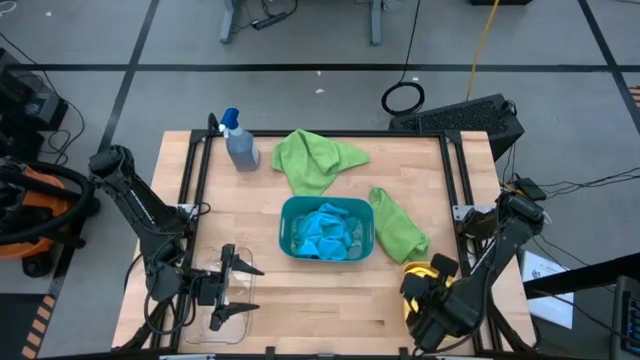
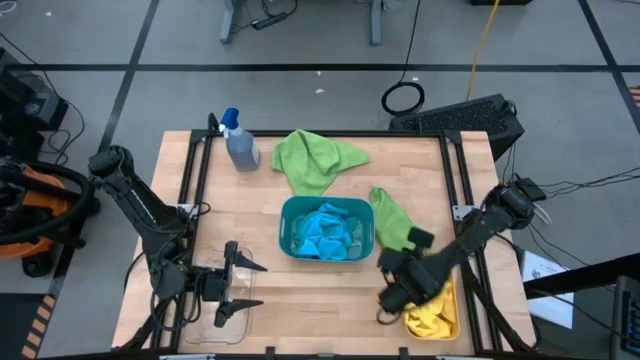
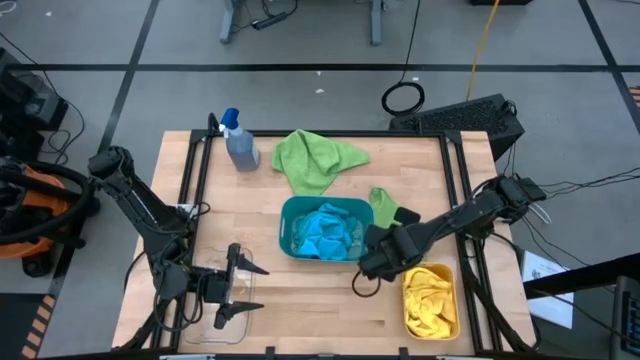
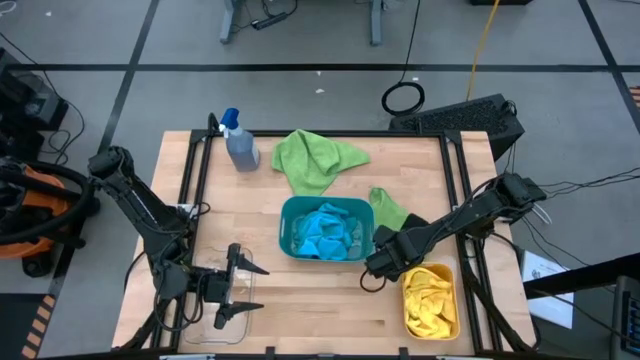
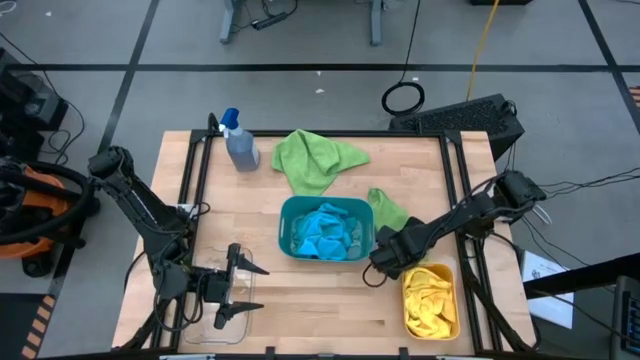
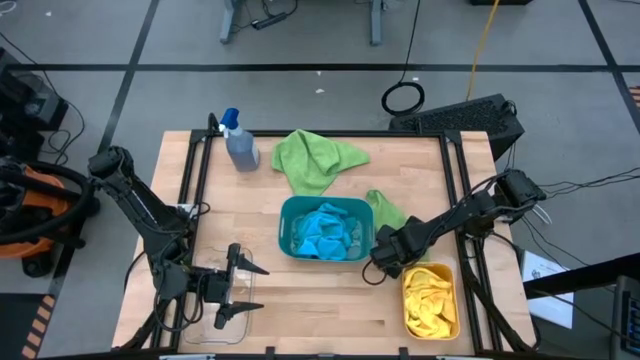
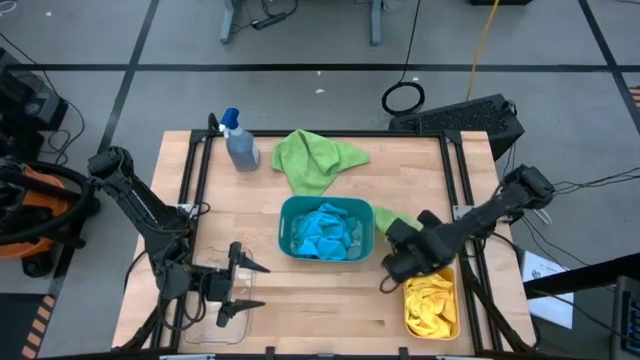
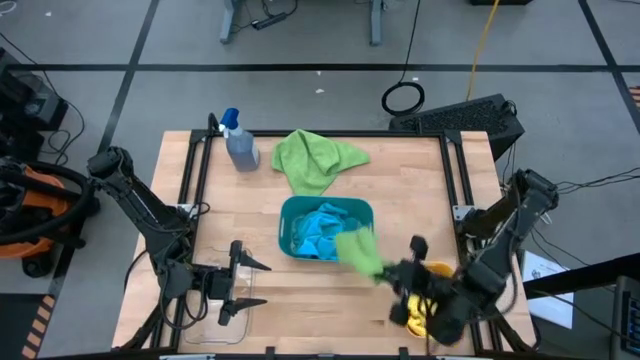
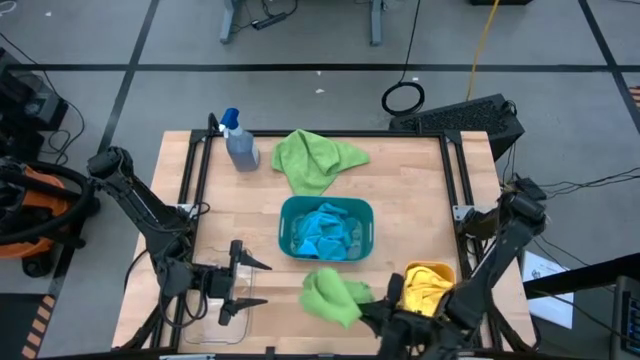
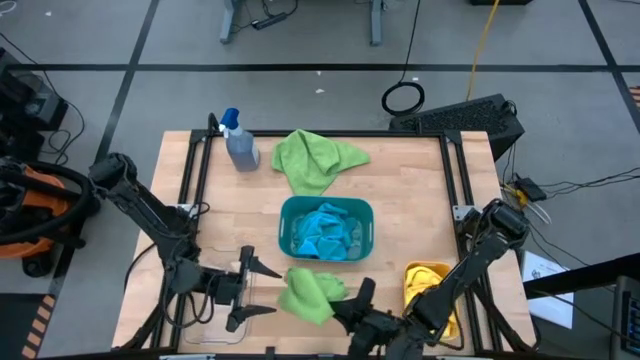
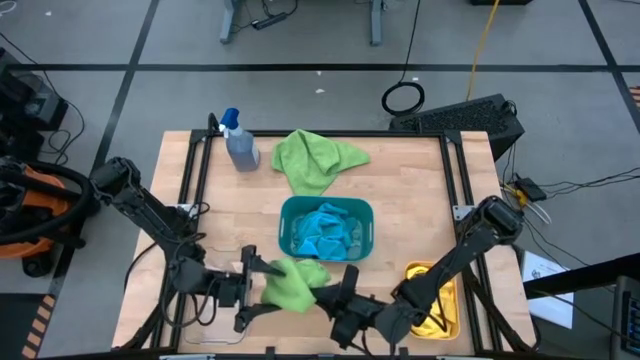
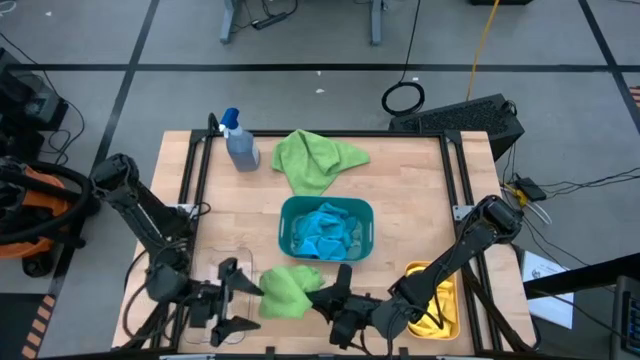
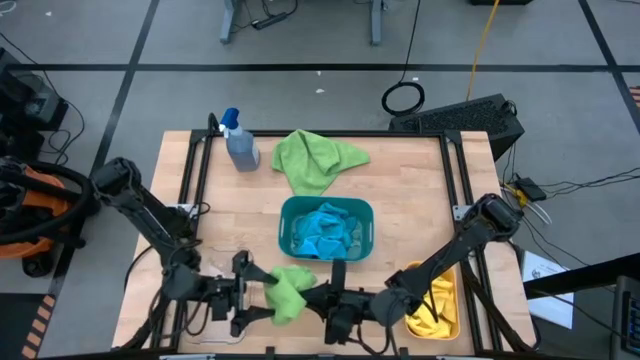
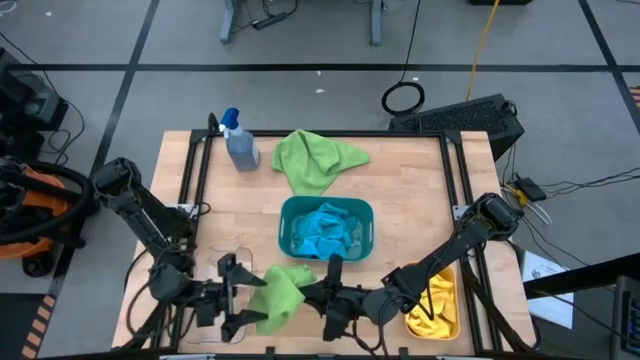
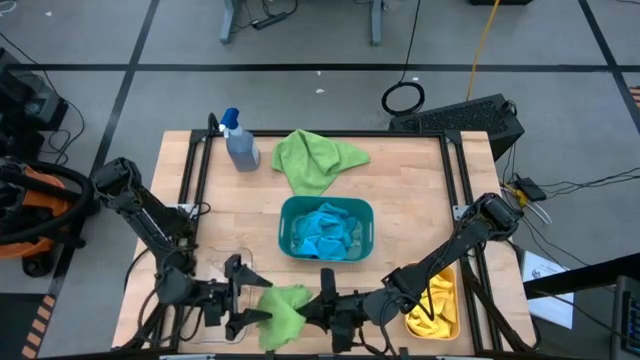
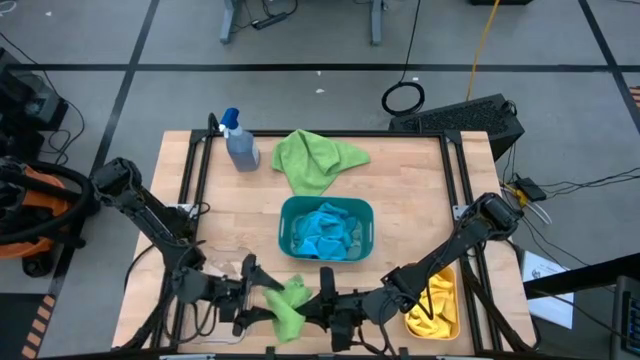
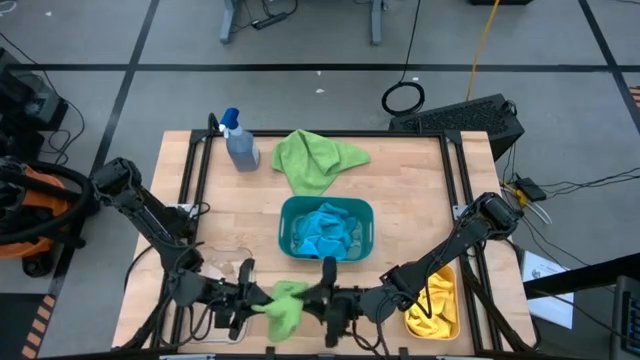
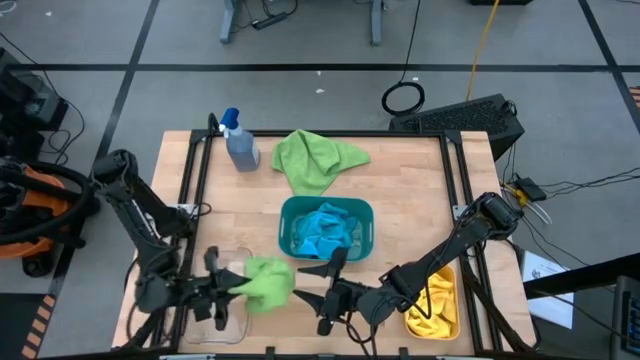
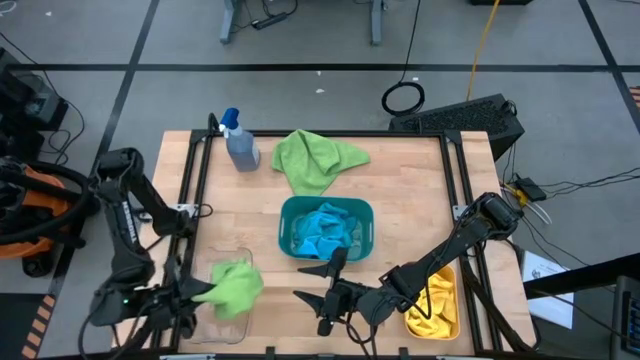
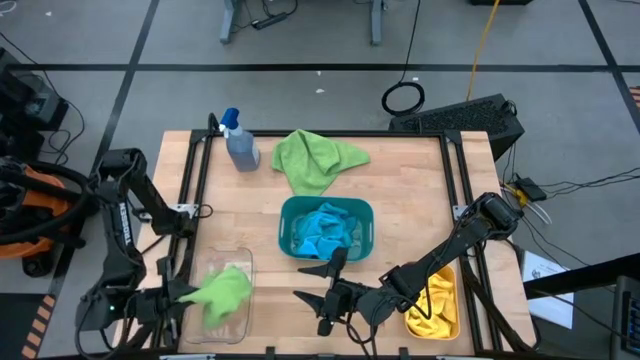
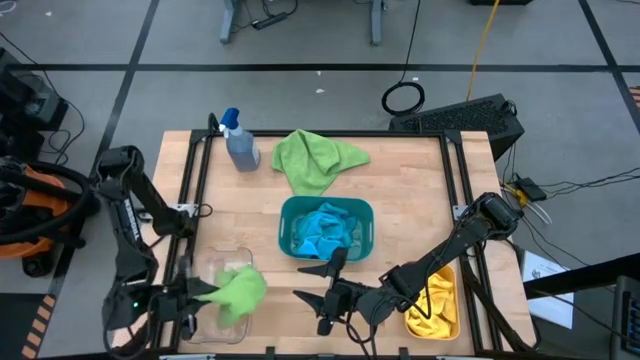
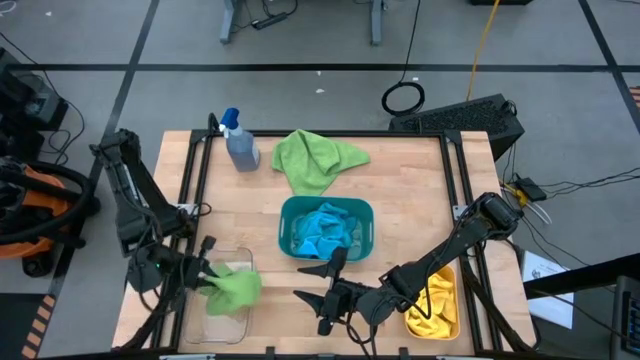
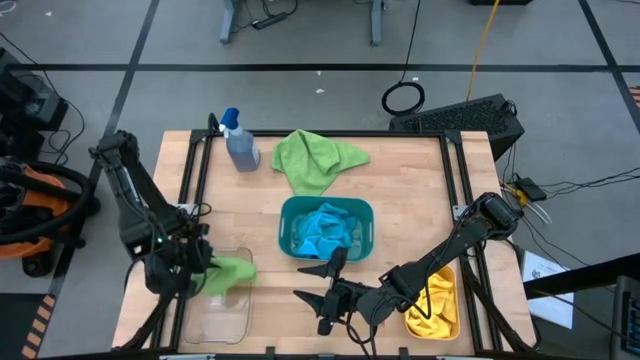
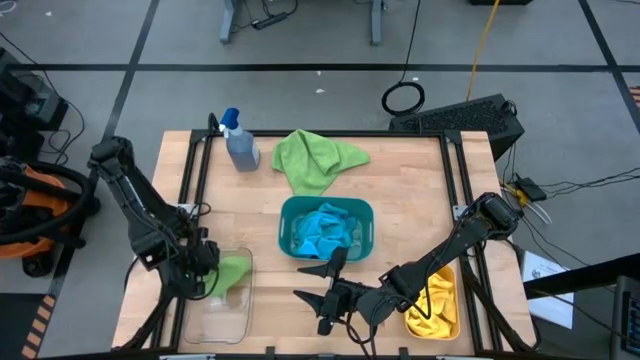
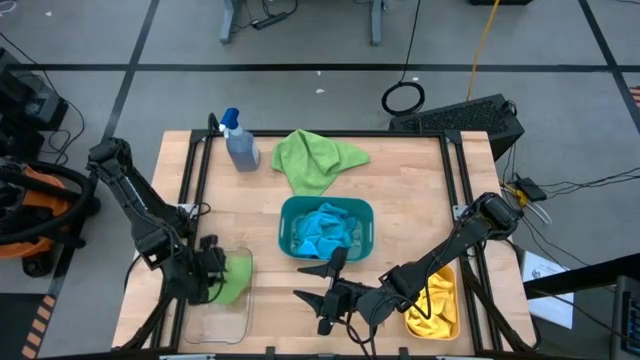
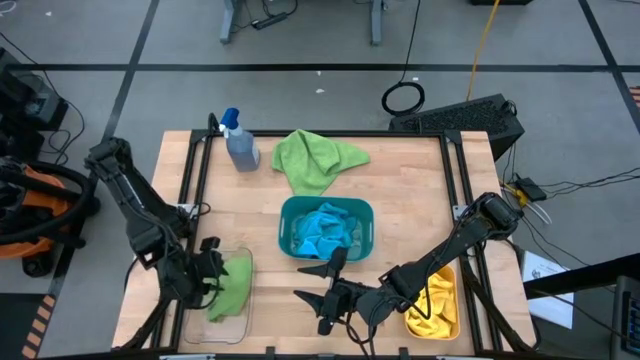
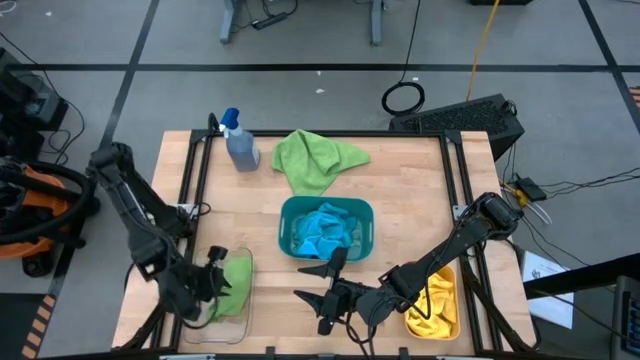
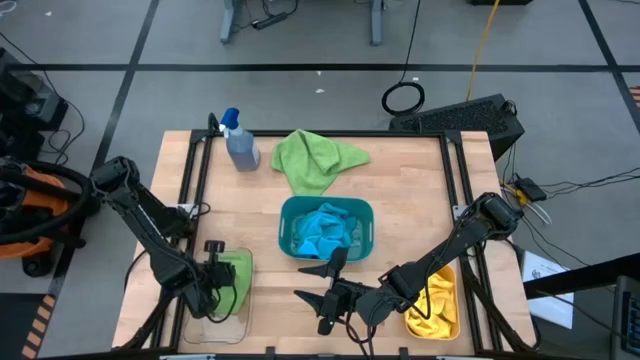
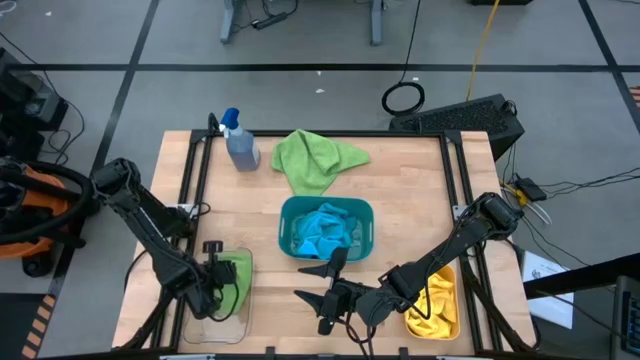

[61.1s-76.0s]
Task: Sort microfiber towel by color & place in baskets
Put the bottom green microfiber towel into the transparent bin

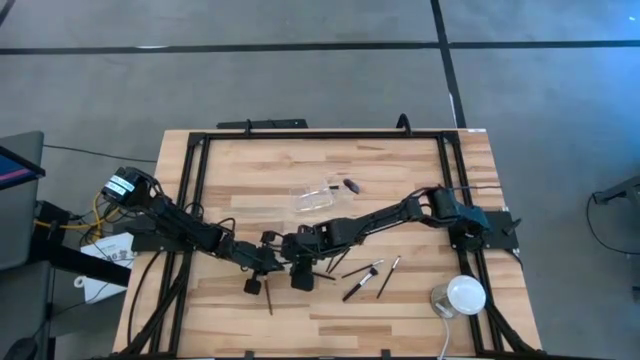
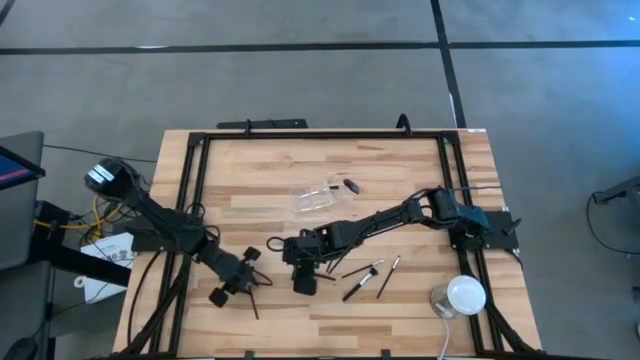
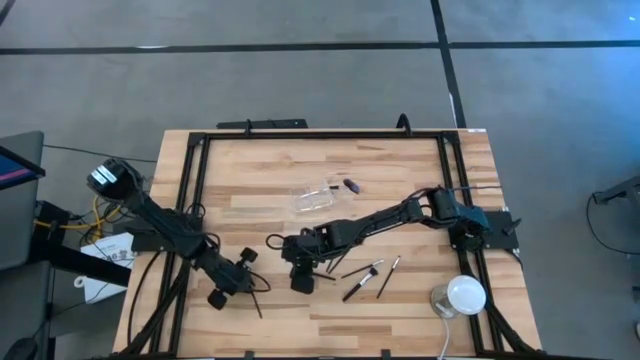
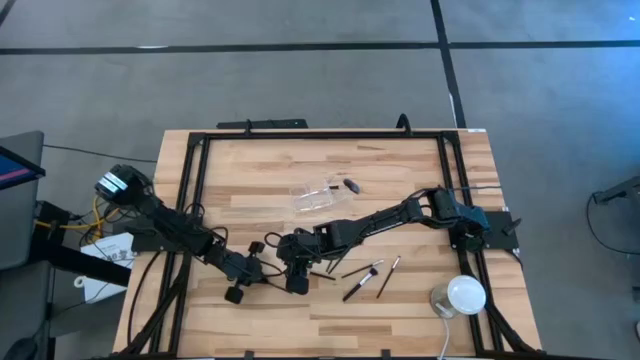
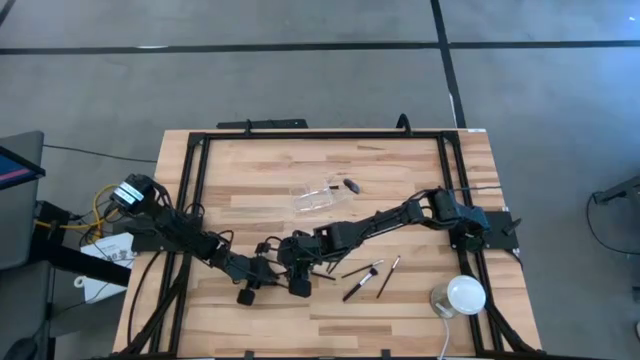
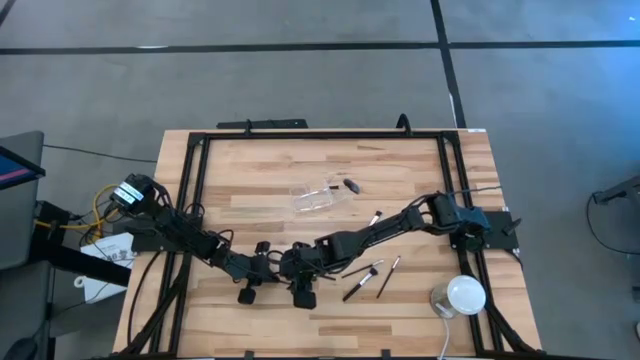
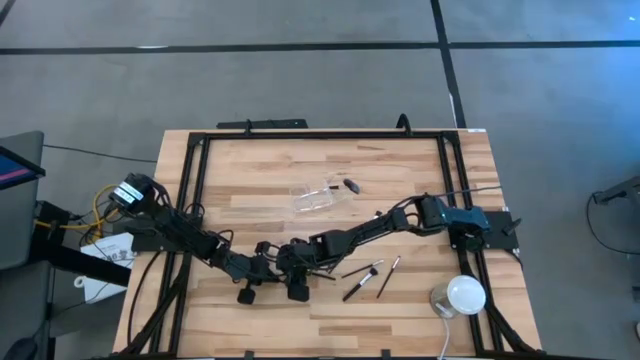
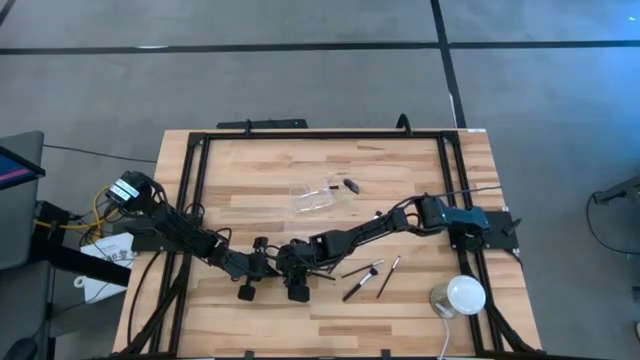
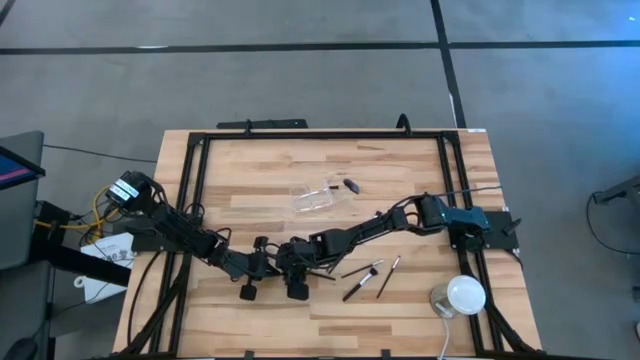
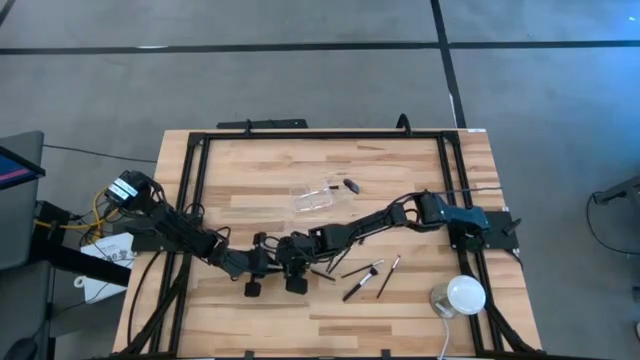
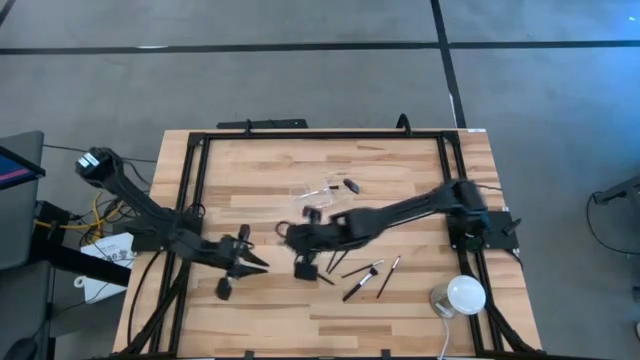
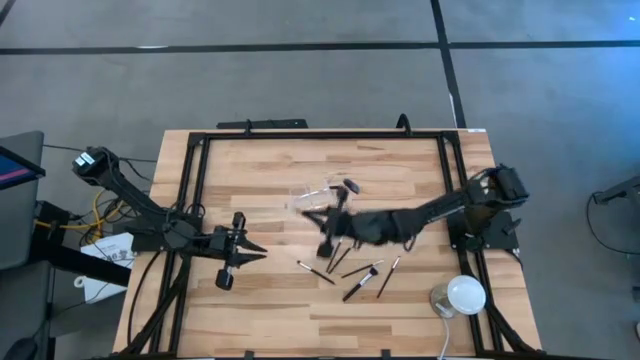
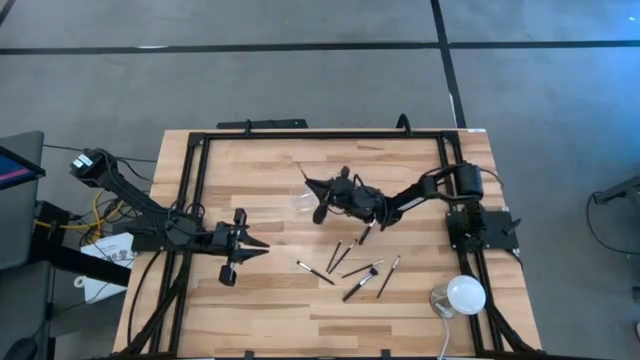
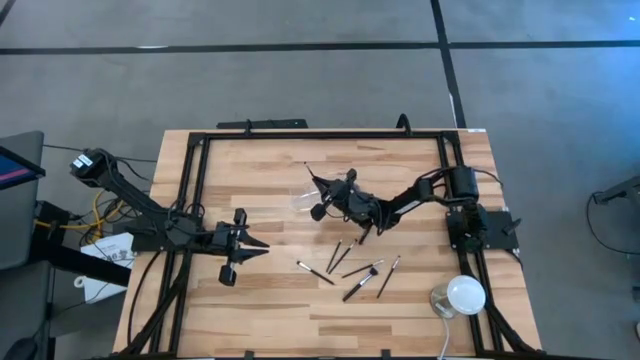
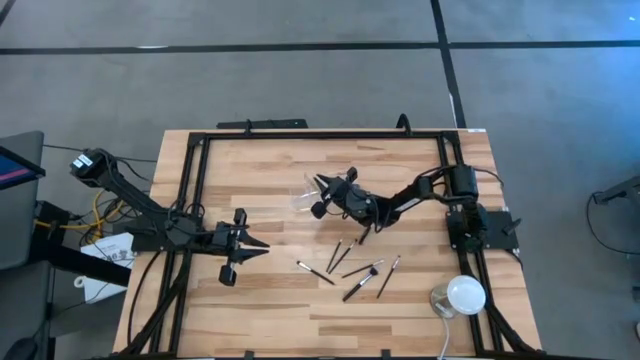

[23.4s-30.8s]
Task: Put items in baskets/containers
Put the eyeshadow brush into the transparent organizer
